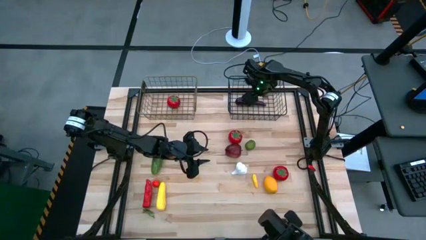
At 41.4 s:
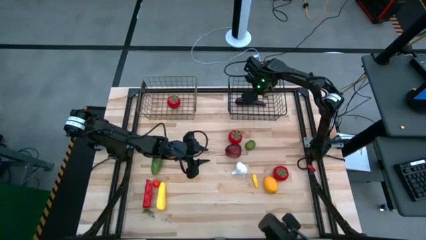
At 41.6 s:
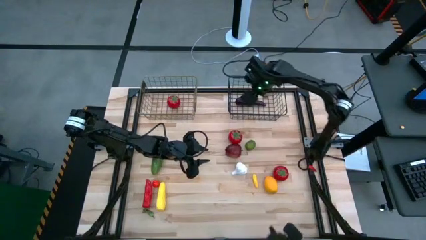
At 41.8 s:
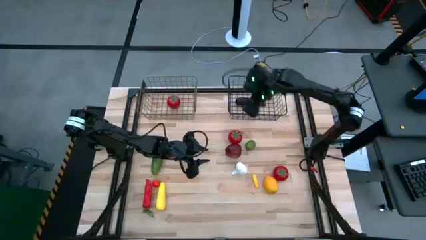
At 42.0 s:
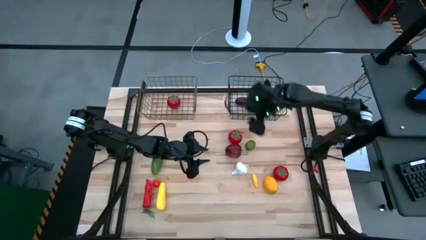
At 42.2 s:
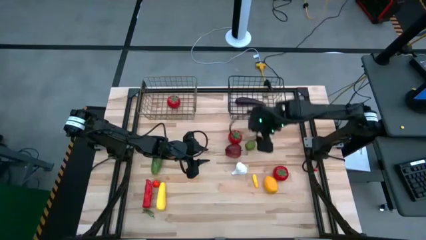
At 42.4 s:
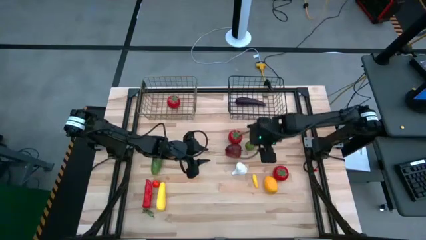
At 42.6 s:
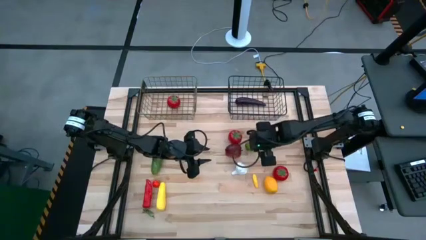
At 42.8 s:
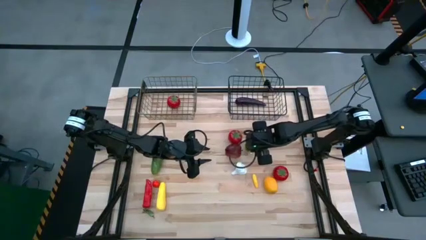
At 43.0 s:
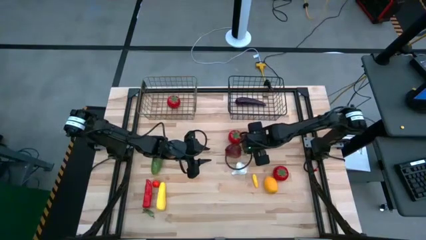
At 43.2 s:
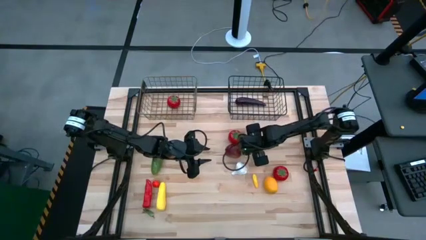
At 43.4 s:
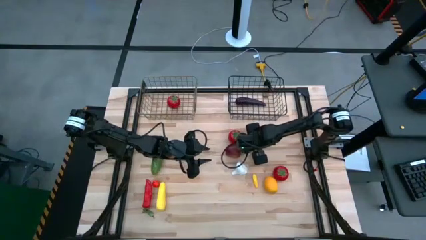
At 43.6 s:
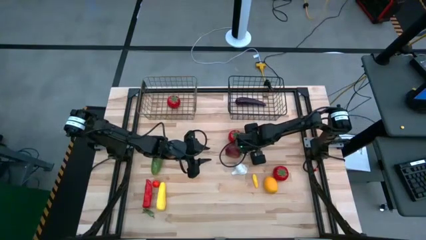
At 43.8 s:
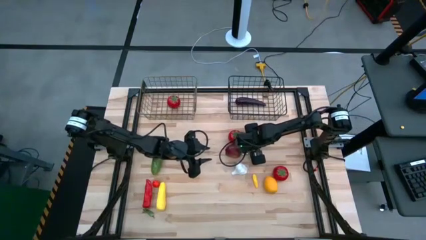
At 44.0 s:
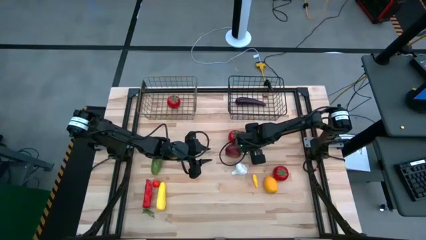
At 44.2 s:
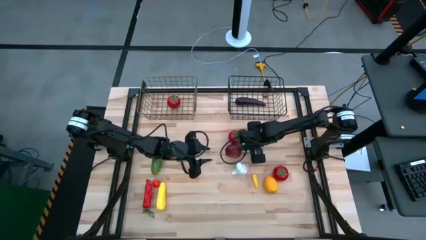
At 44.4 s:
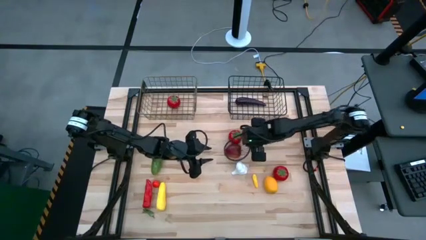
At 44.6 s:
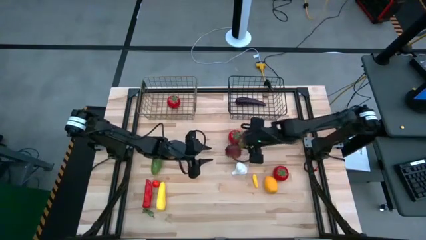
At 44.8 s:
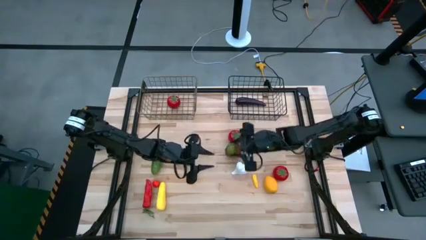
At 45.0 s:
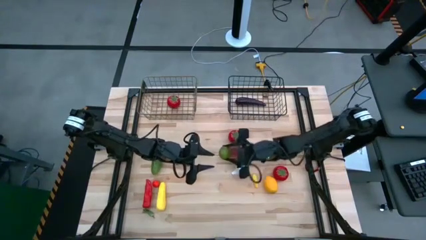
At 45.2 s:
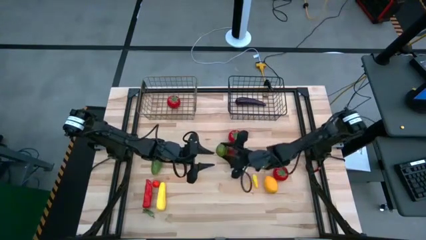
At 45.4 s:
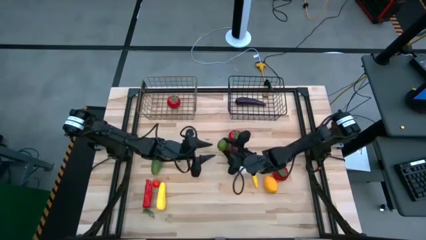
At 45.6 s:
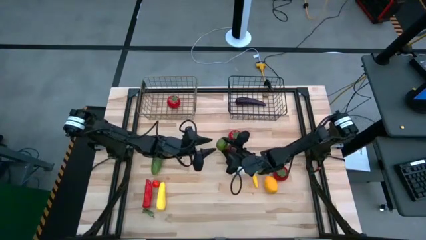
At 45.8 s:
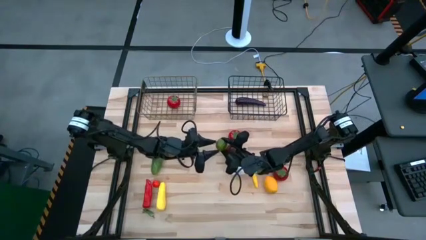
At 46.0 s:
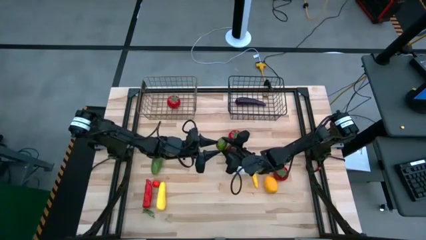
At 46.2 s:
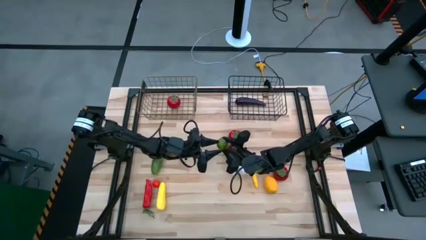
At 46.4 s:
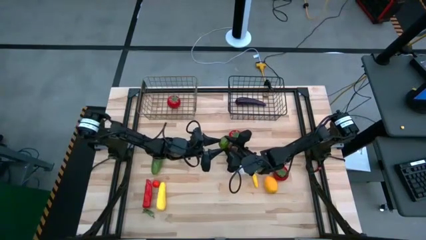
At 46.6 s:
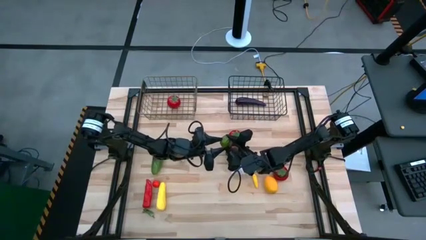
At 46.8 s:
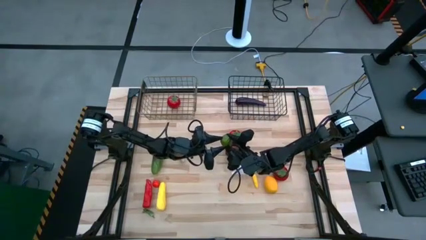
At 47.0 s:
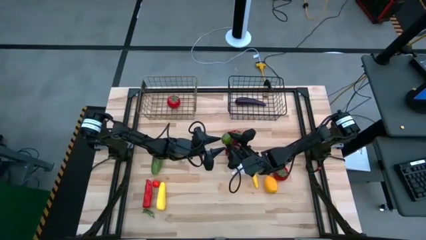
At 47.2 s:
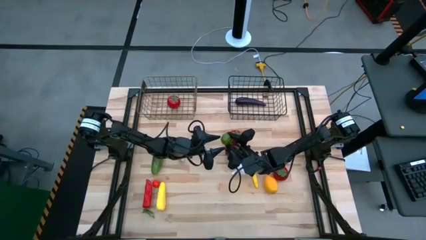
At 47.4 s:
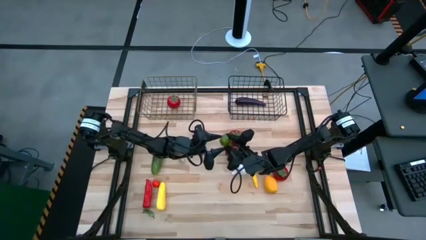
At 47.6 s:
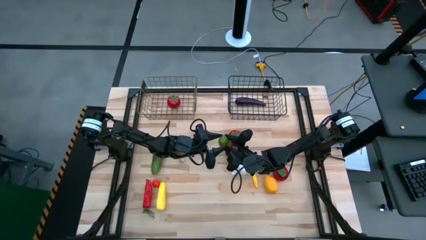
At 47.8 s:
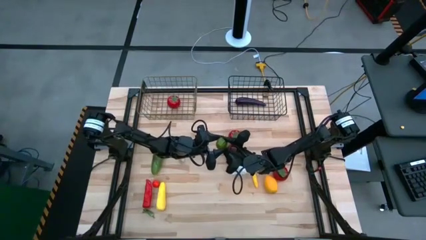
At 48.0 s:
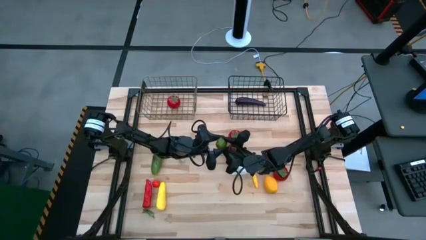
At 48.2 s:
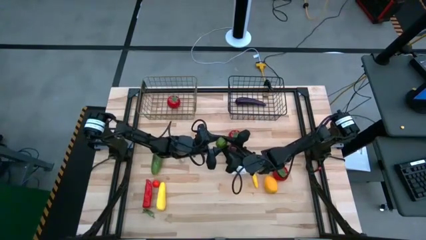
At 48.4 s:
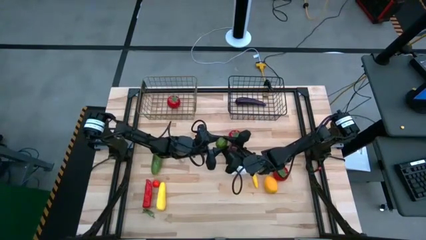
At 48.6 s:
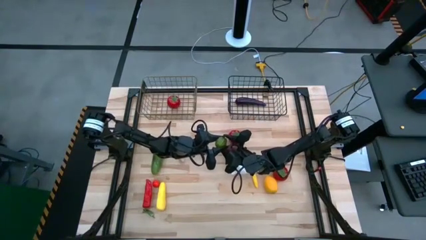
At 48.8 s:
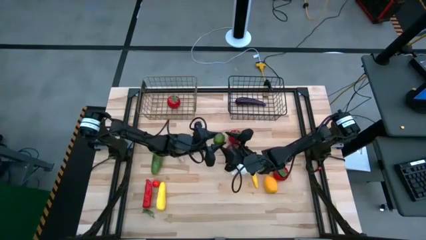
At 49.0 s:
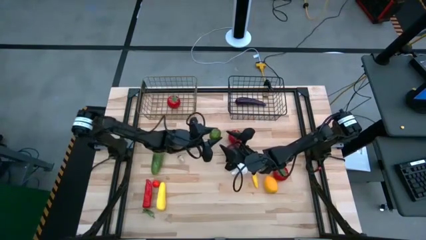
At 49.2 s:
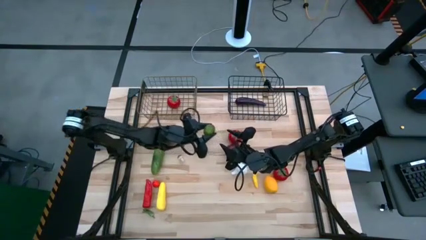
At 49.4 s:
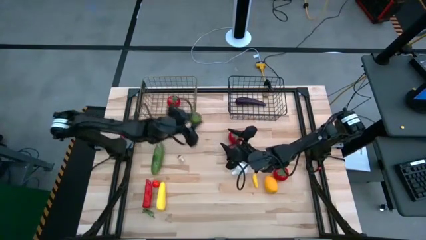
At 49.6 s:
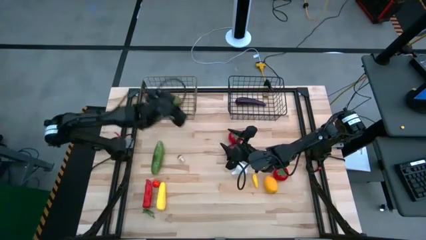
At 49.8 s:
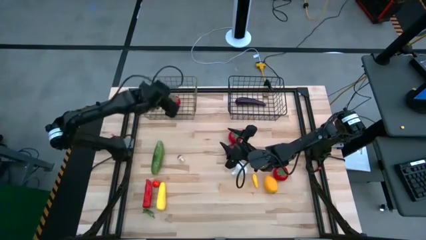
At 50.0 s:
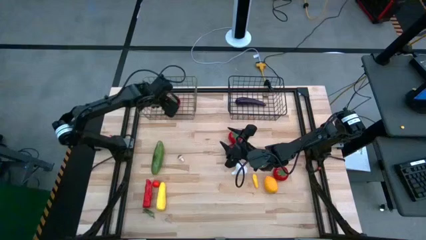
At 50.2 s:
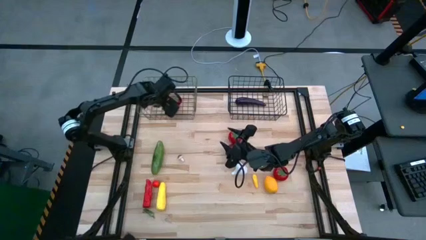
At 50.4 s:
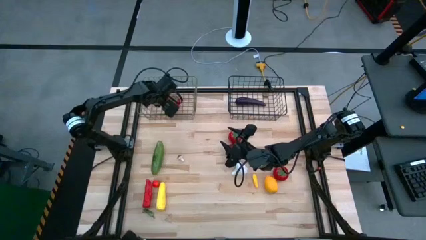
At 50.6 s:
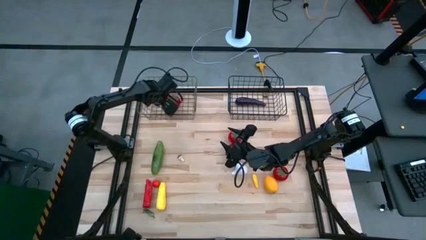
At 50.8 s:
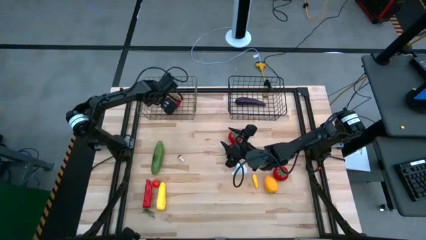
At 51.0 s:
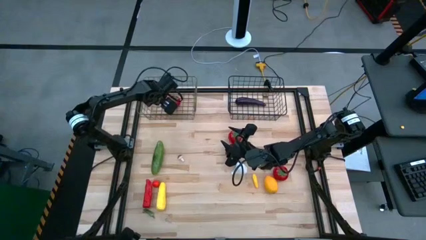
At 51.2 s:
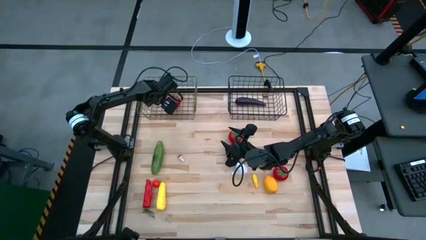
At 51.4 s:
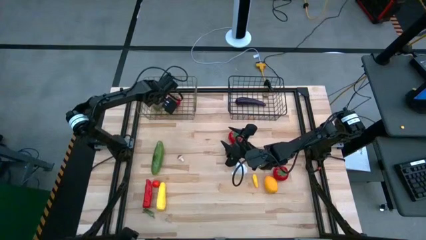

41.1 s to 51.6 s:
Task: Sort produce into baskets
Put the lime into the left wire basket

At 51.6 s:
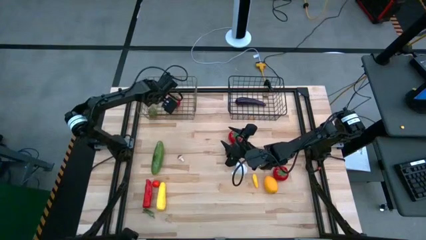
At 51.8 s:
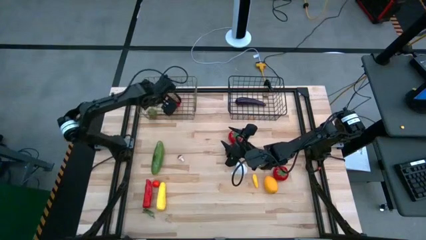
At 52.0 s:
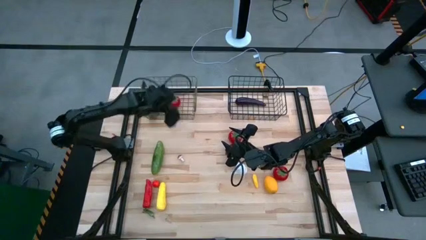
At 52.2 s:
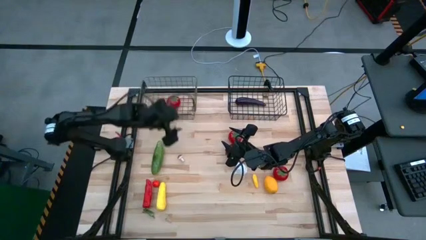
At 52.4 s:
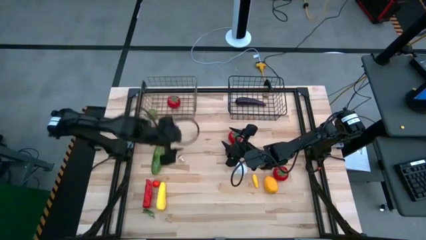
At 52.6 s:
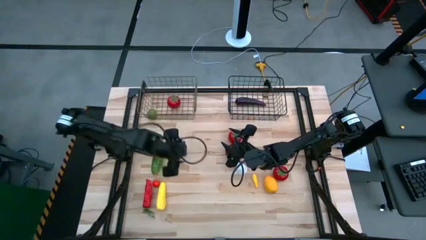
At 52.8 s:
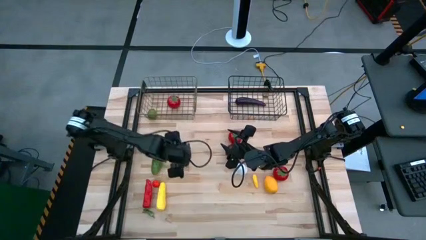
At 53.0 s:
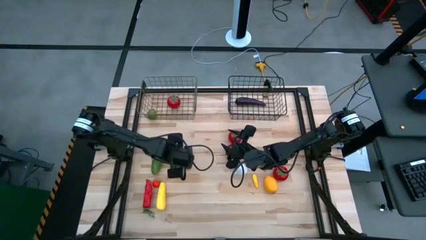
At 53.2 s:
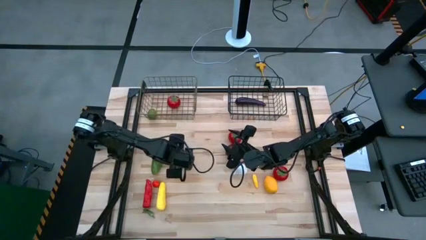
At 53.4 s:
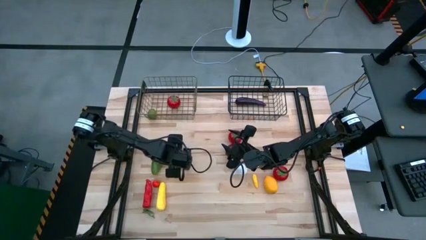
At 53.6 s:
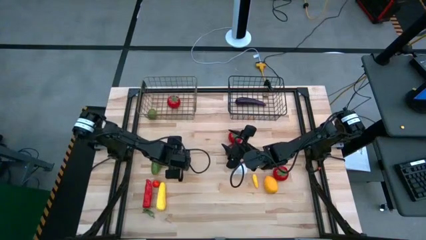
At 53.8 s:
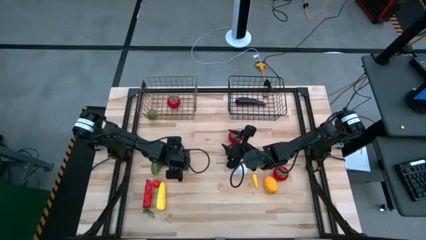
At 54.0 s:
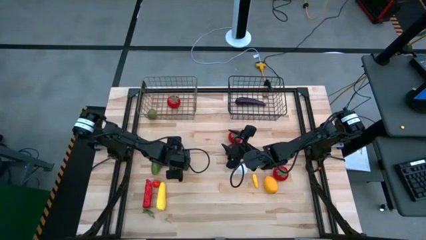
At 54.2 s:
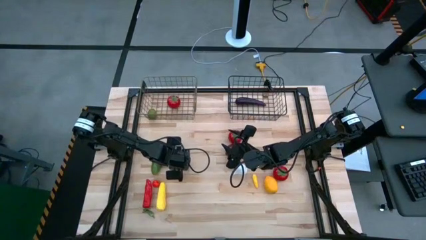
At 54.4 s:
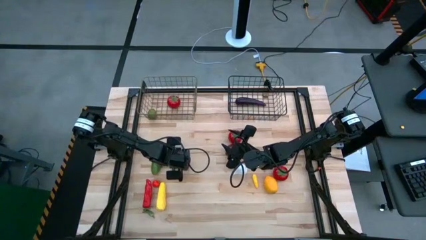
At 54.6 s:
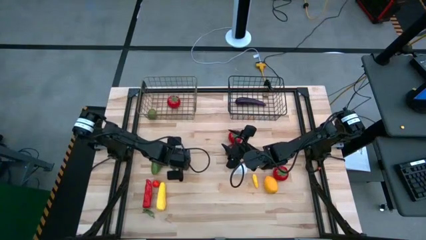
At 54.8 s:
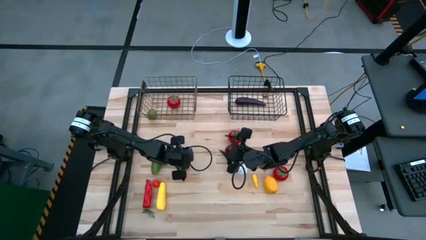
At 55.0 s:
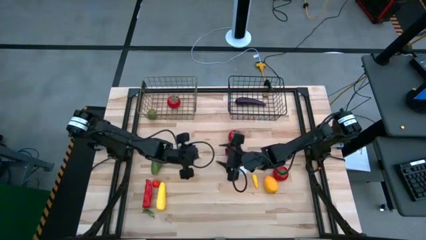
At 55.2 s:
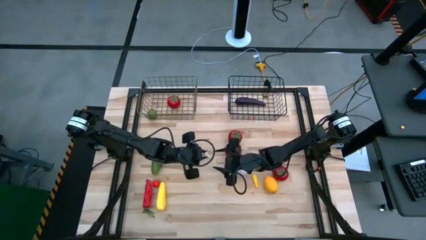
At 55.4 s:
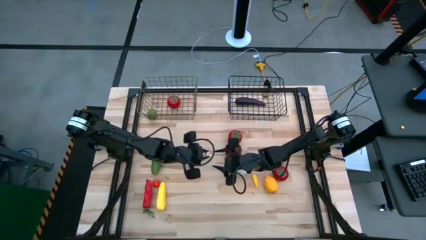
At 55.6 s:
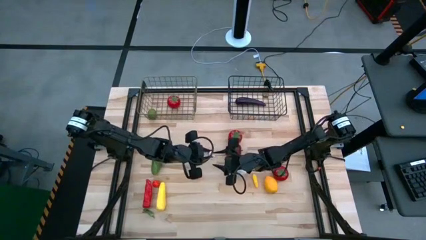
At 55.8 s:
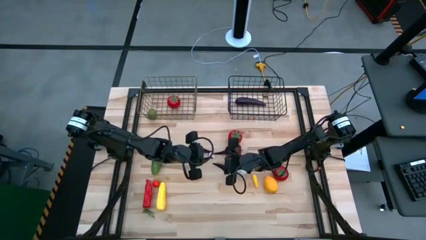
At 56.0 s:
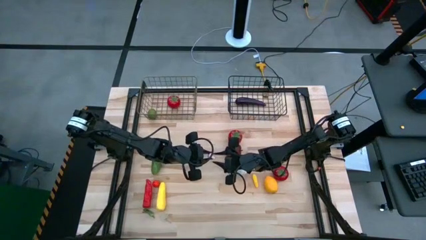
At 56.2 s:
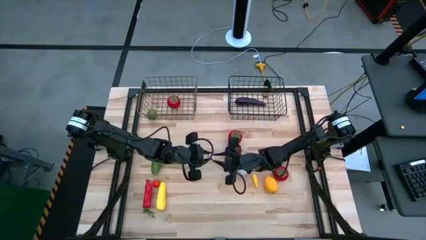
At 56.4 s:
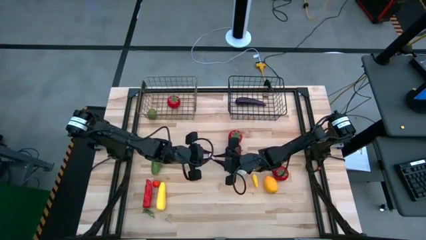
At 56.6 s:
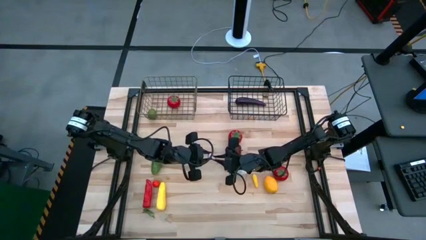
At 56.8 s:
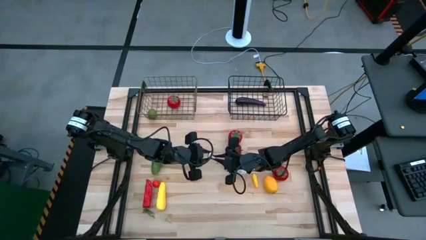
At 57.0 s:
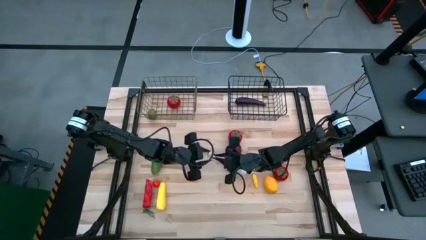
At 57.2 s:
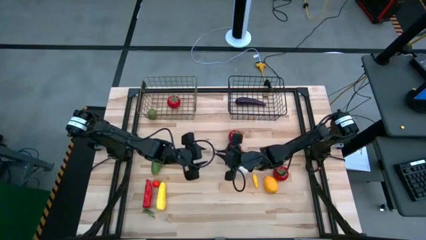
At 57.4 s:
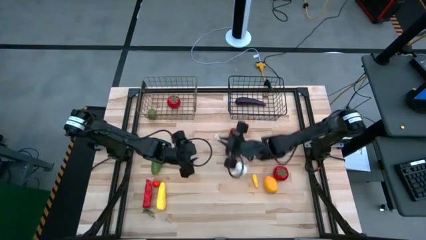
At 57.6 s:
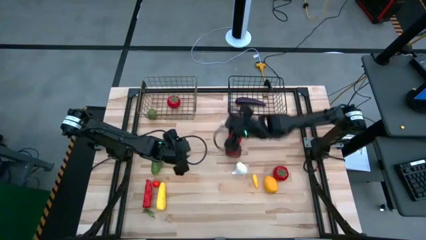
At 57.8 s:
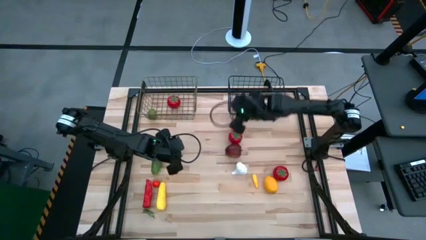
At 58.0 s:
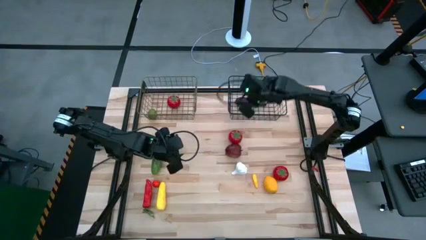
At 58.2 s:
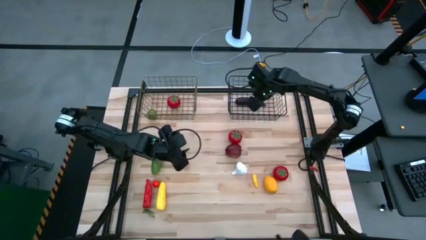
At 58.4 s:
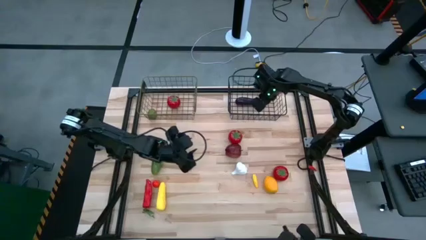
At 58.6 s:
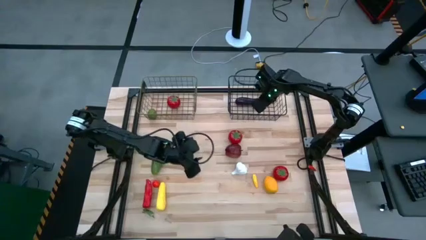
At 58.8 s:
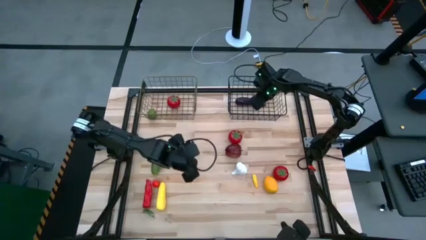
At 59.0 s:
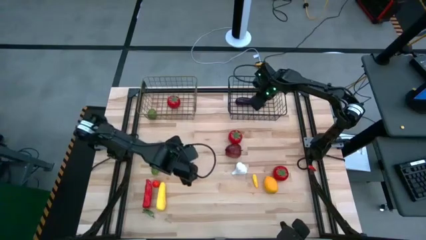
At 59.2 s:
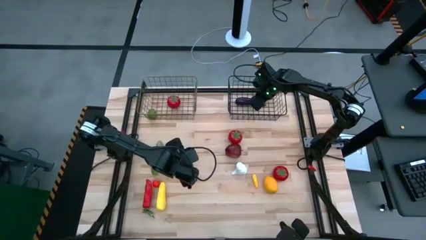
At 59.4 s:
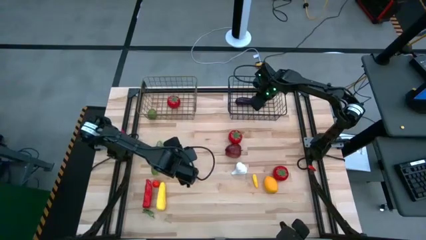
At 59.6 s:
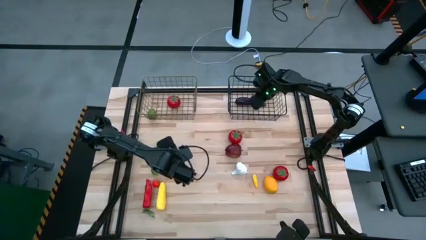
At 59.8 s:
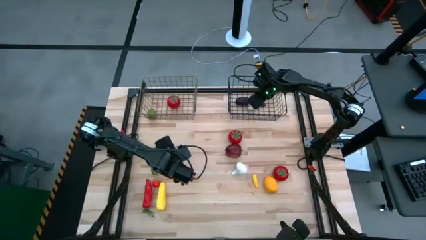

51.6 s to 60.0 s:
Put the mushroom into the right wire basket
